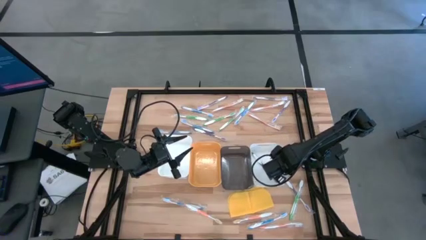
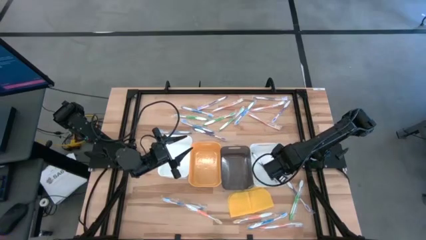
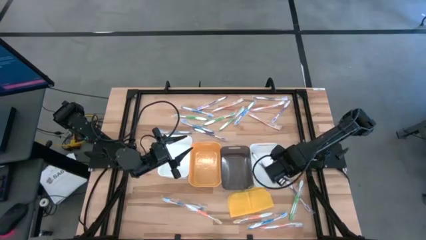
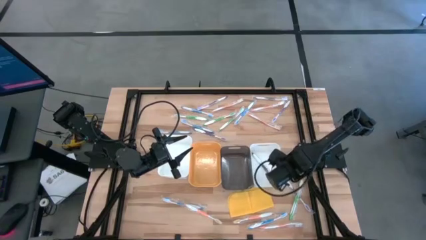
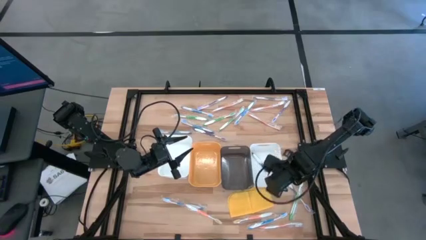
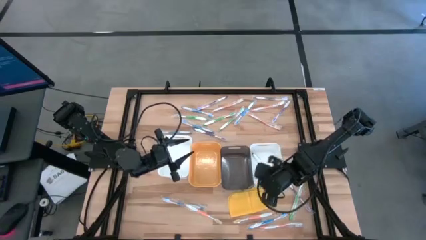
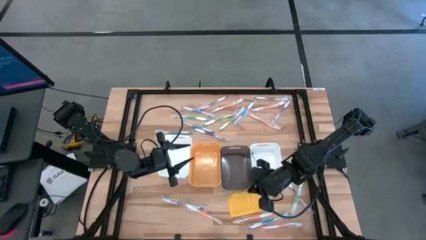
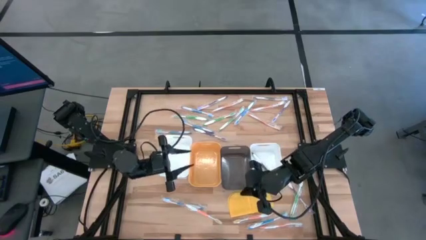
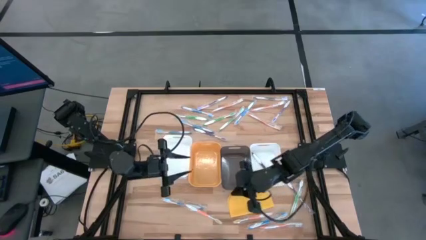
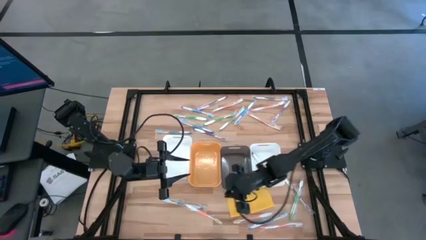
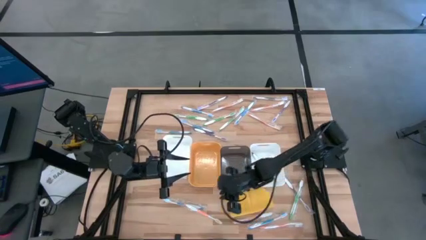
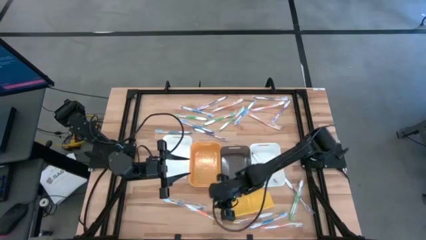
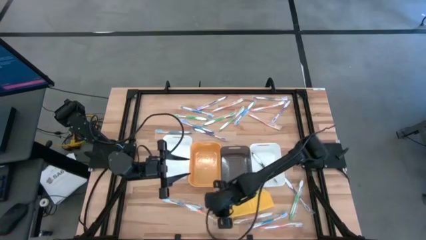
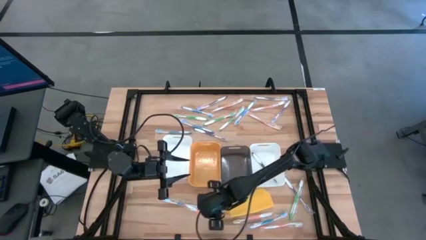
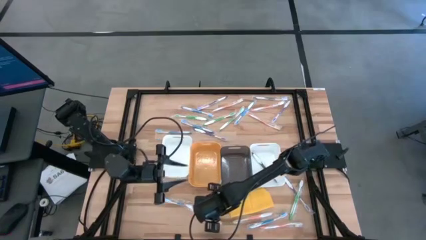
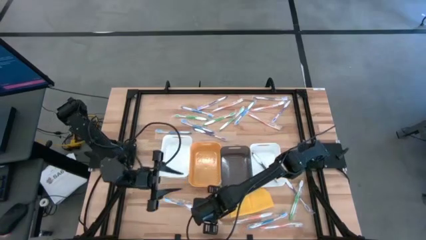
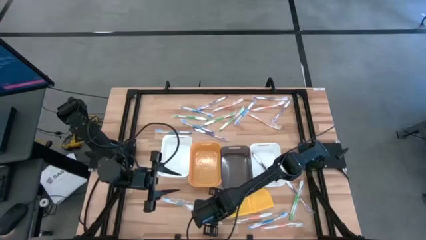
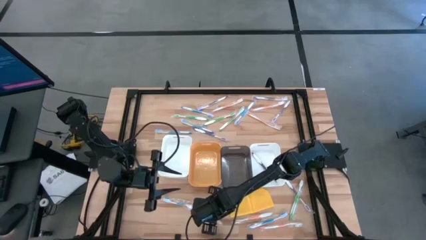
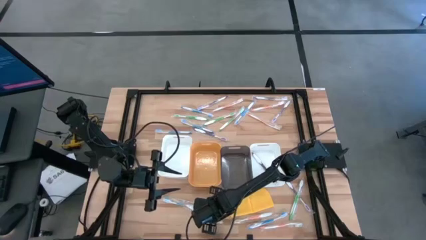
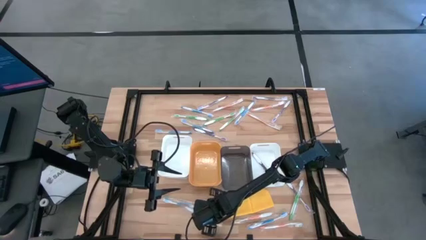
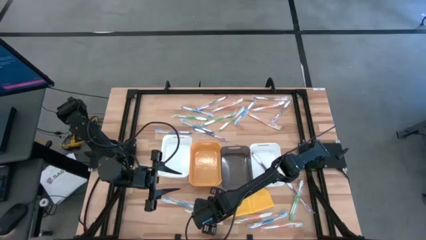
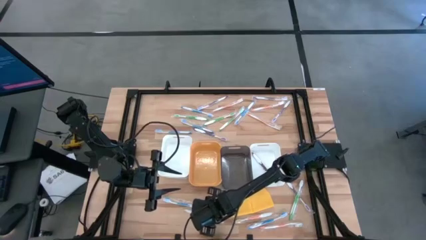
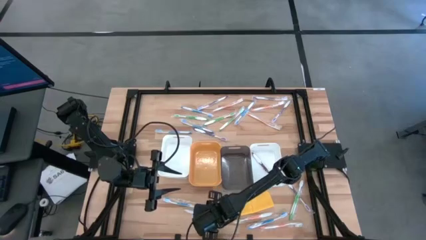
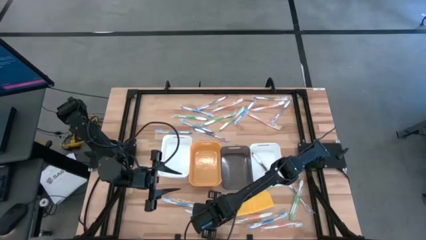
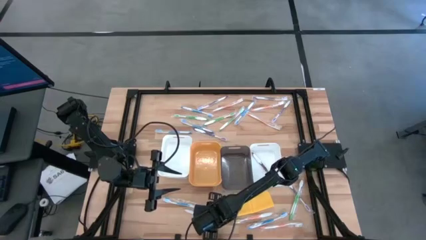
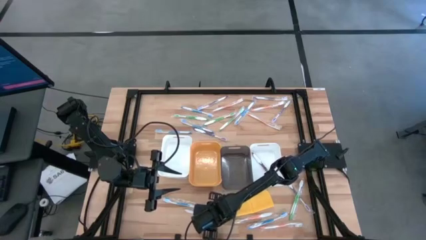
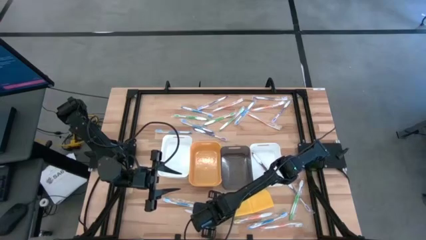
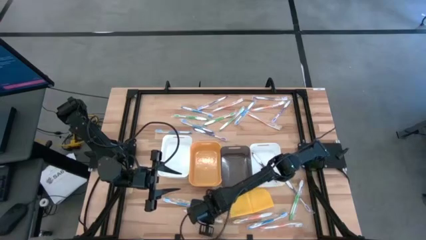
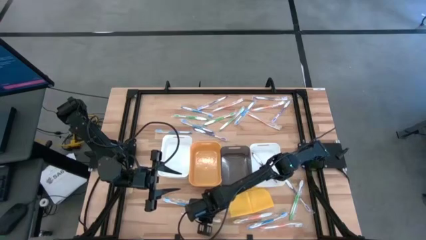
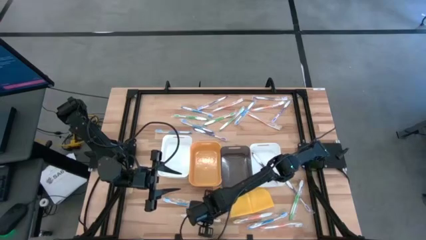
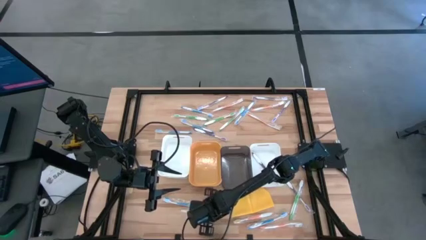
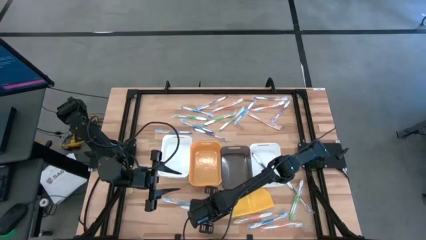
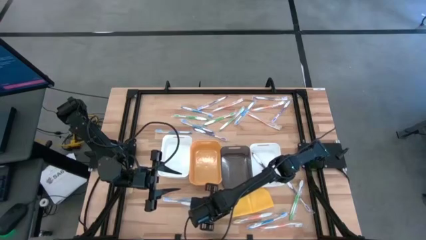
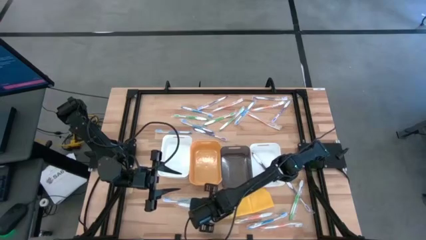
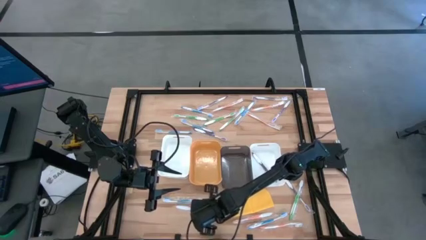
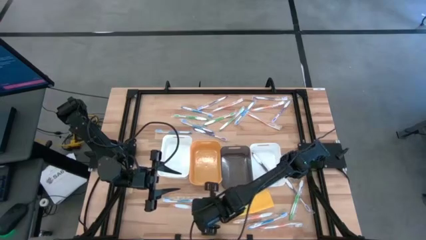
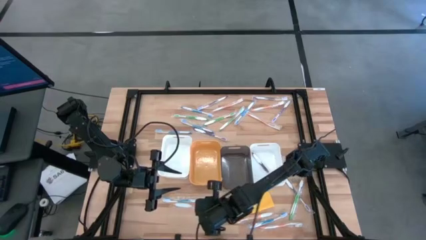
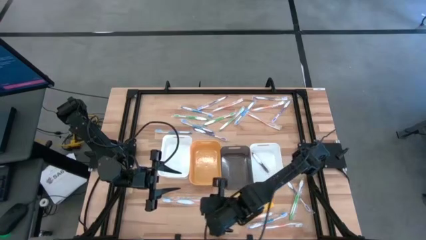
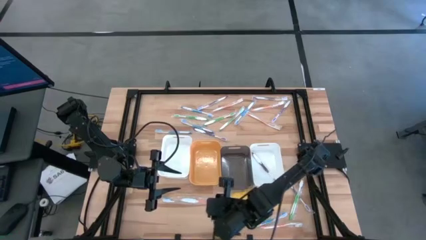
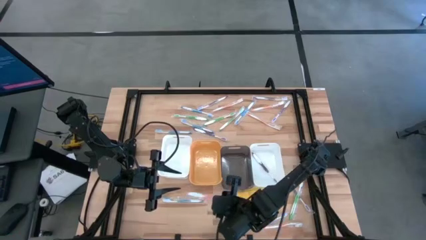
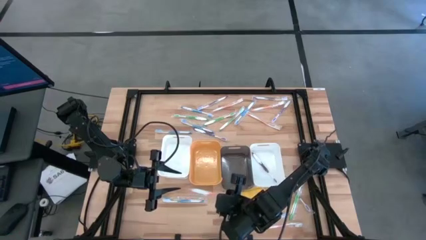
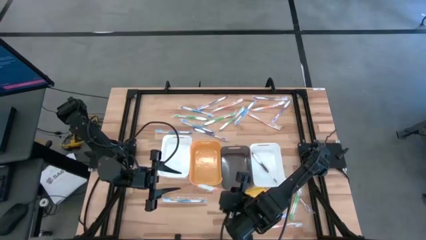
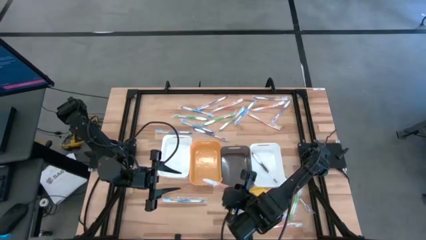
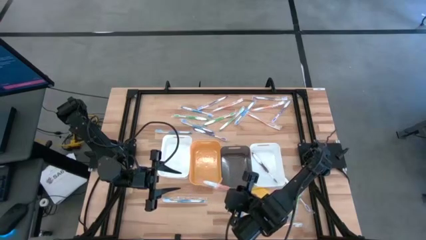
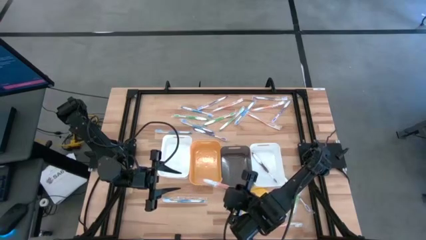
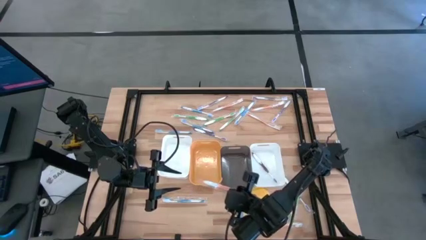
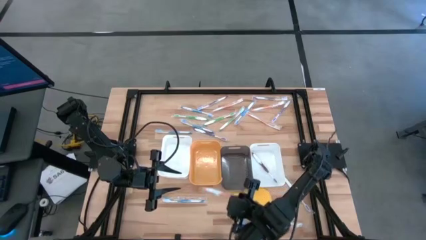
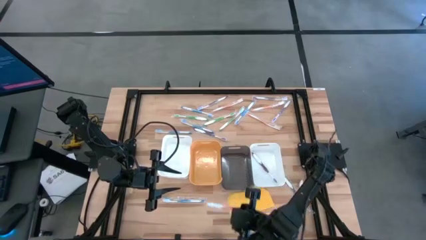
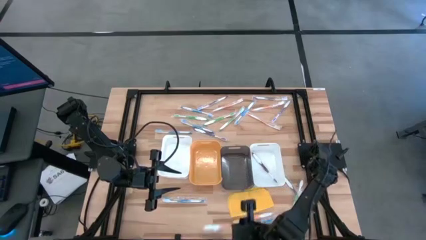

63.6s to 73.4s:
Task: Pick & Place Toothbrushes
Put the orange toothbrush into the left white bin

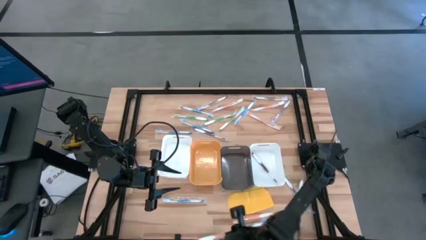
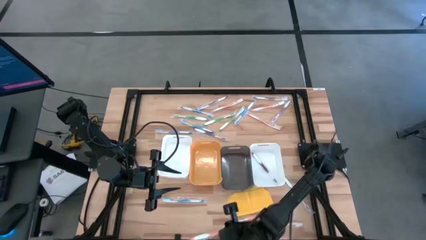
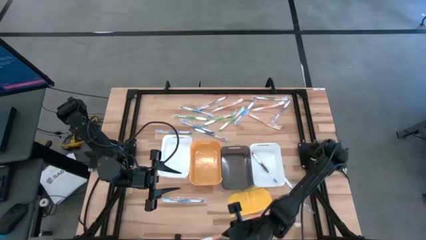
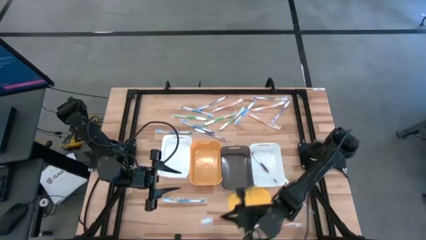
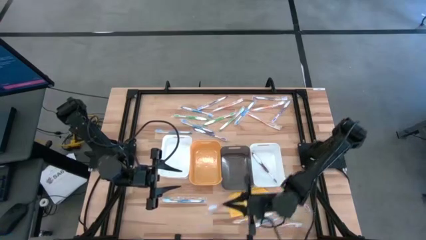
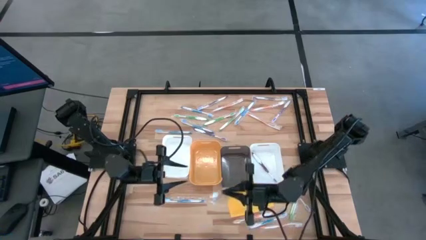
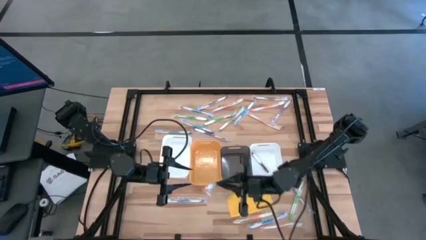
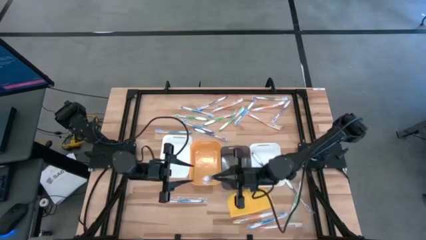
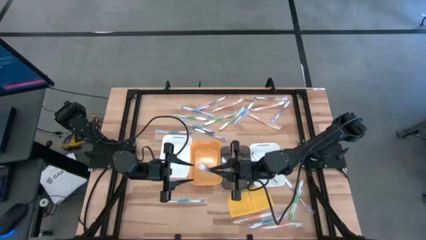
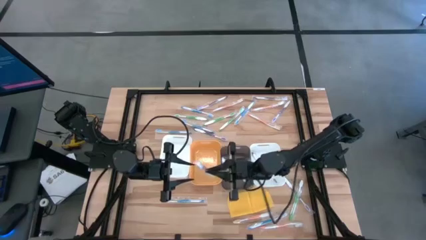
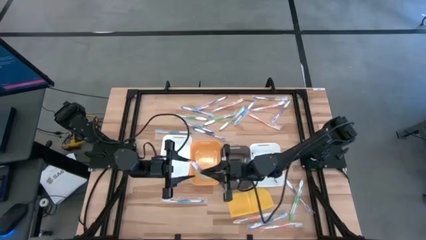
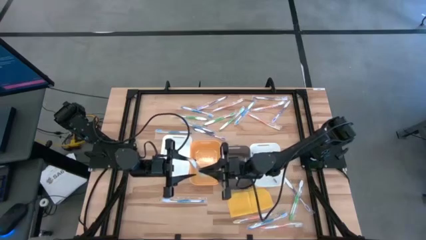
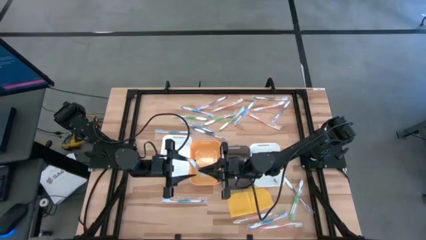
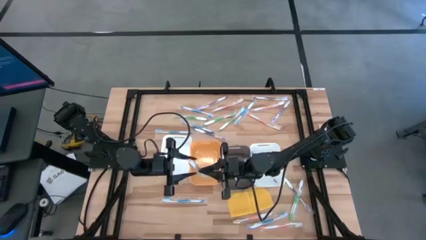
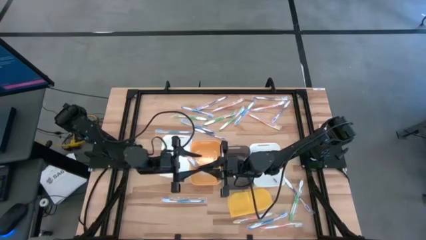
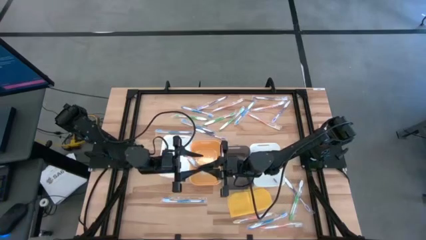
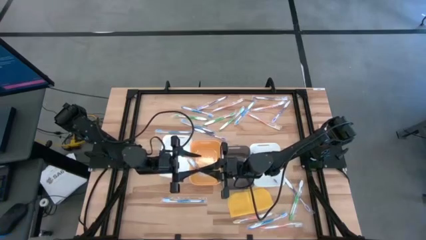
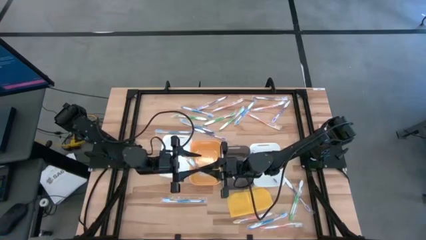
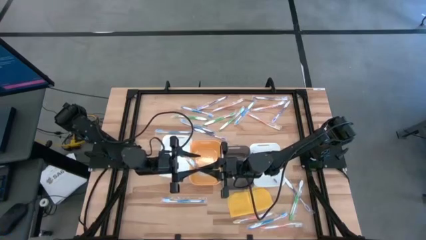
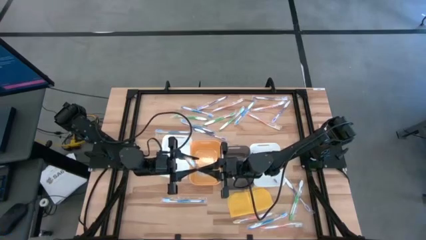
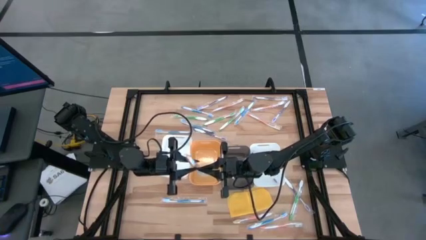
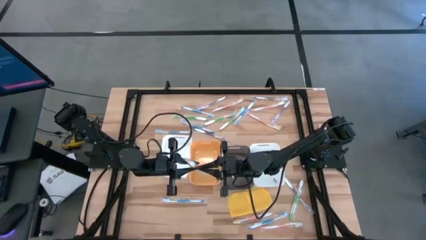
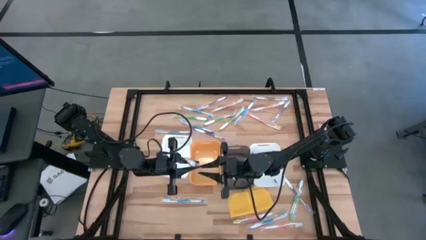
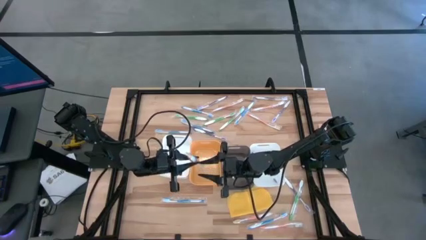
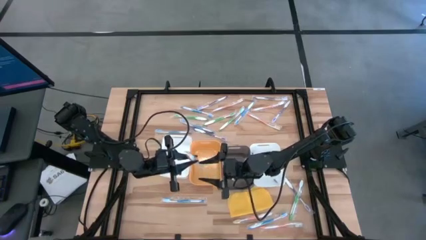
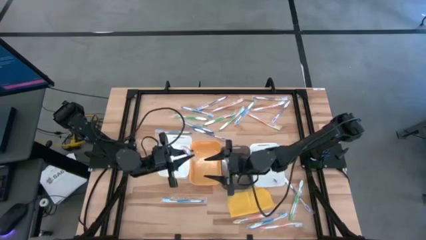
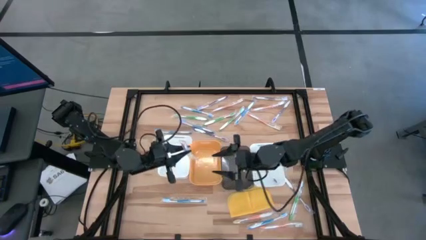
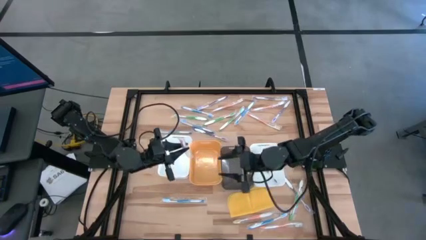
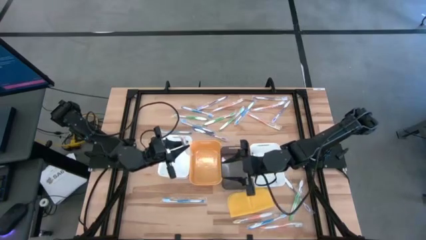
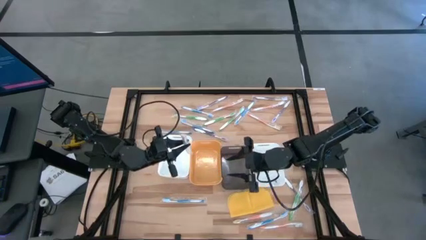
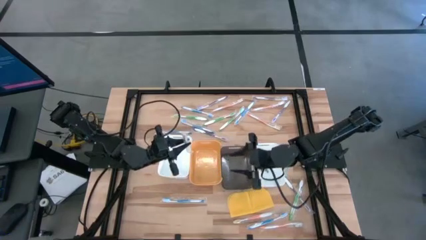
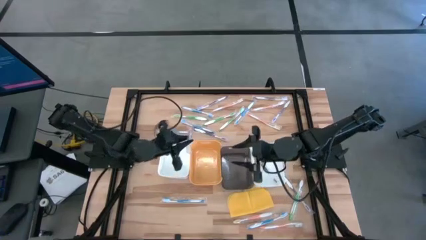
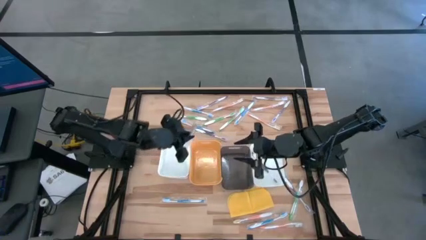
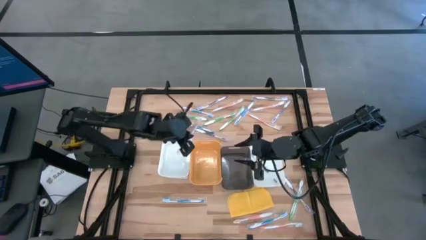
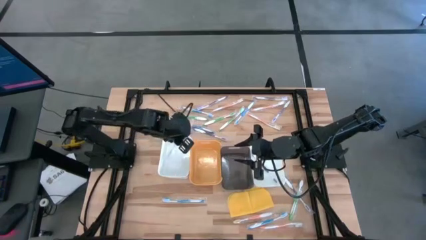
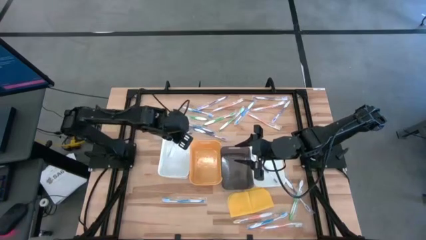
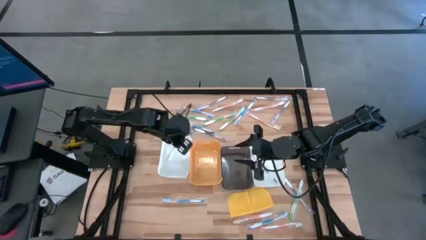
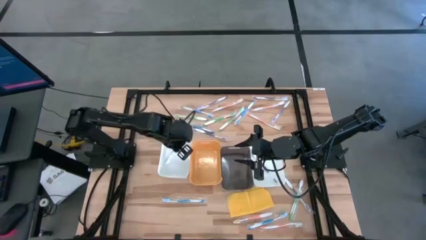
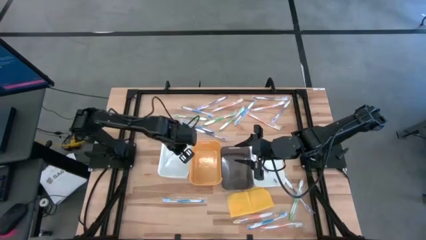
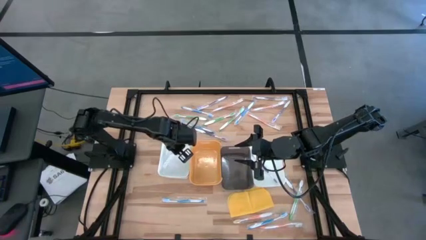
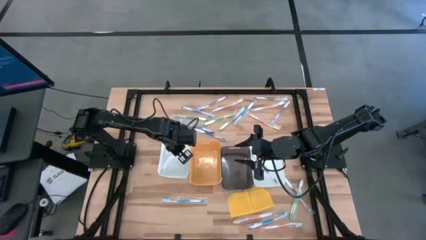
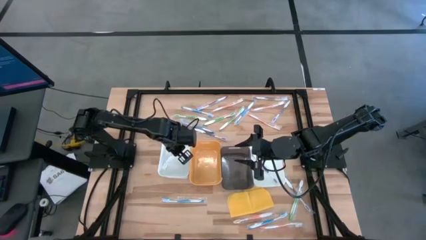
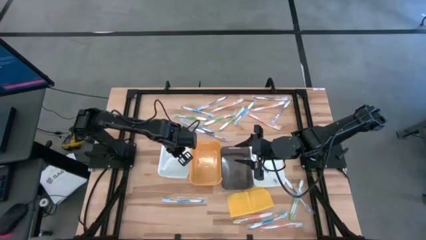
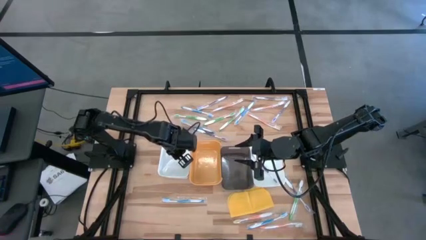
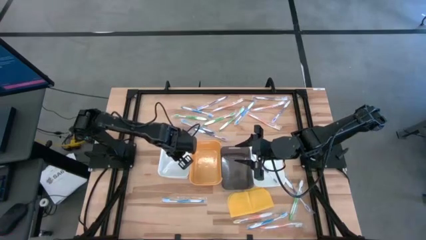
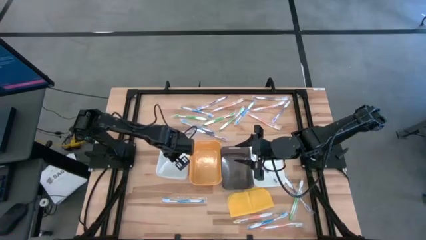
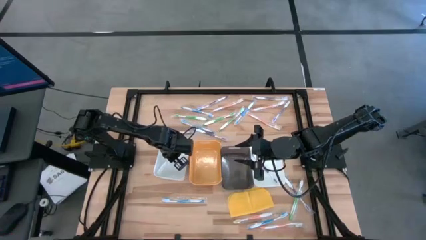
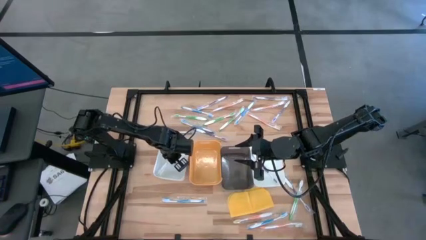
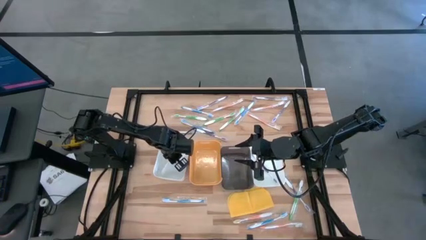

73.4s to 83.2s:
Put the orange toothbrush into the left white bin
